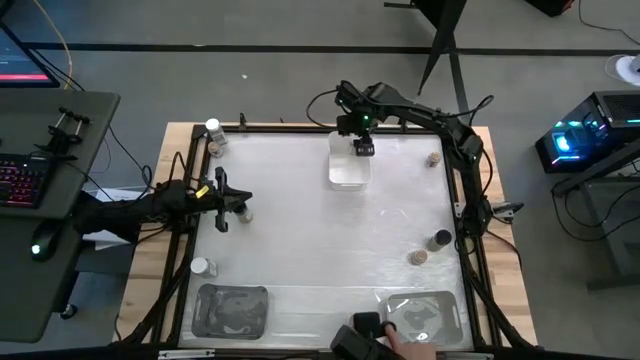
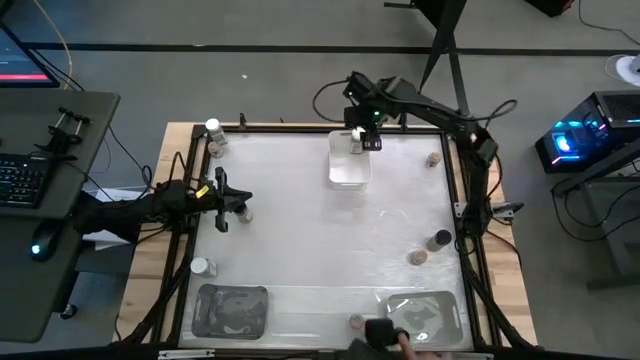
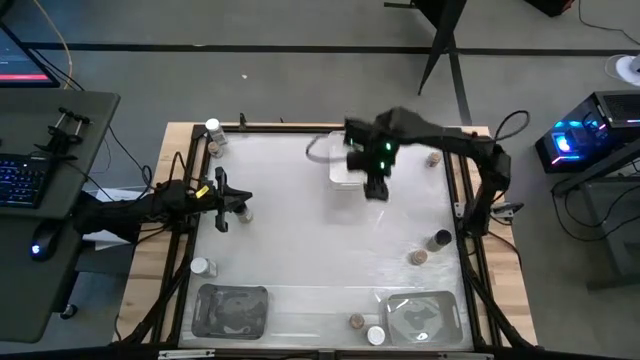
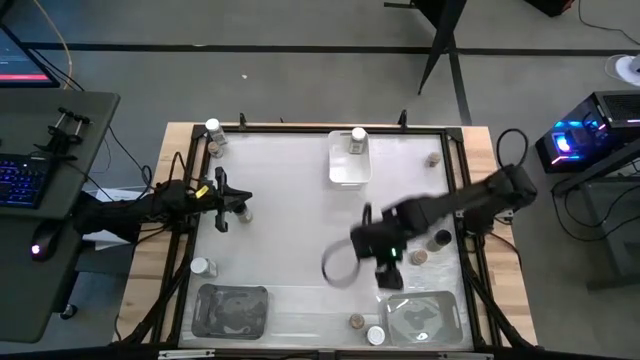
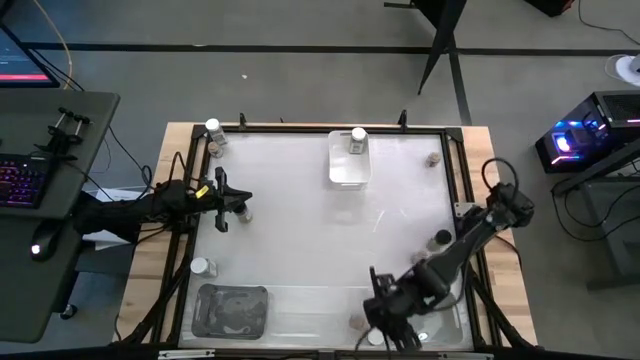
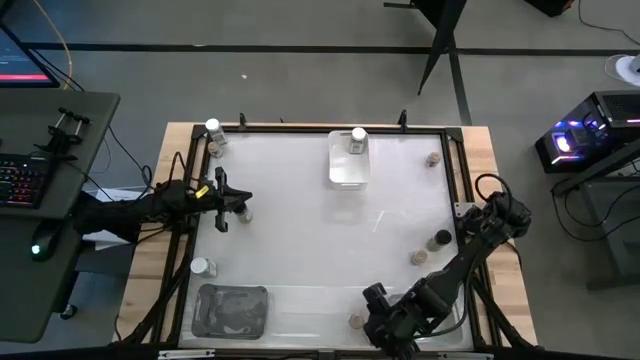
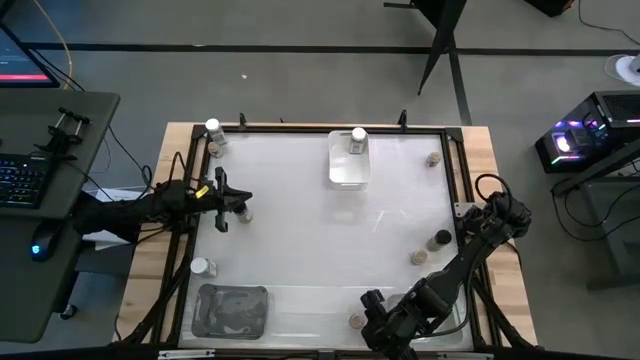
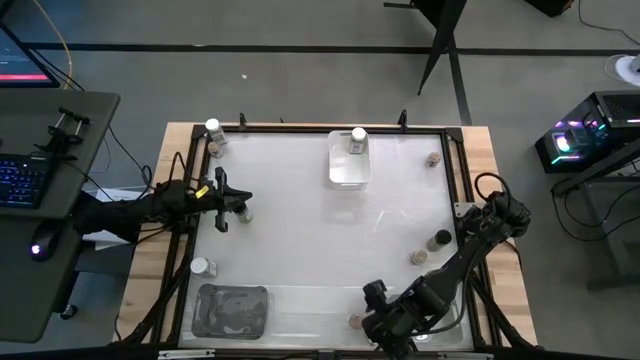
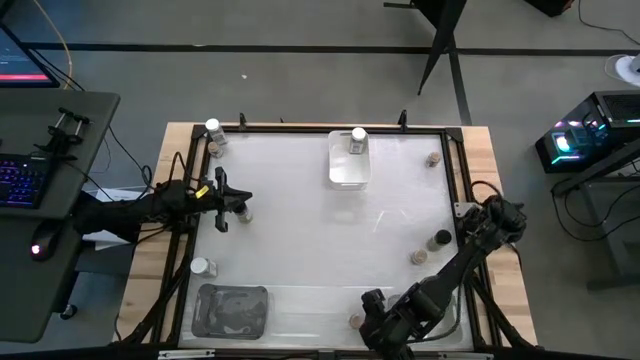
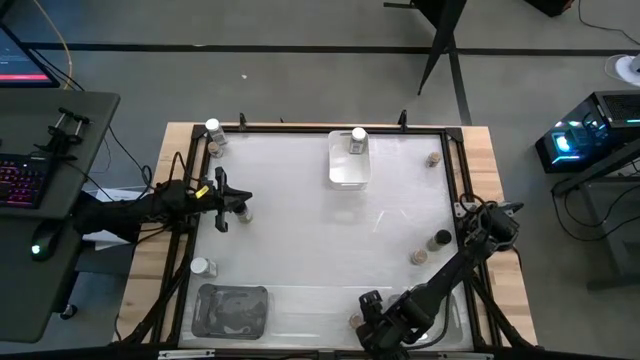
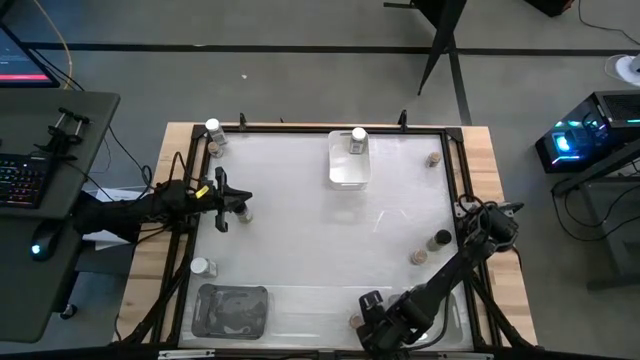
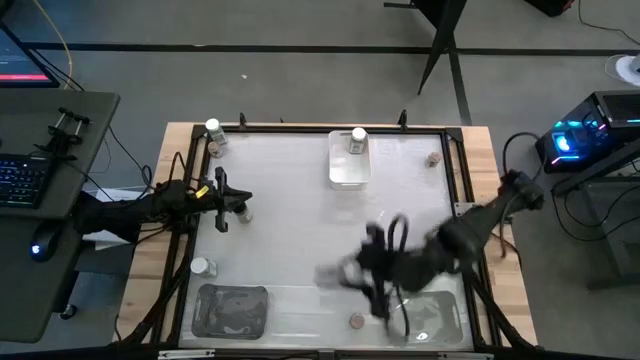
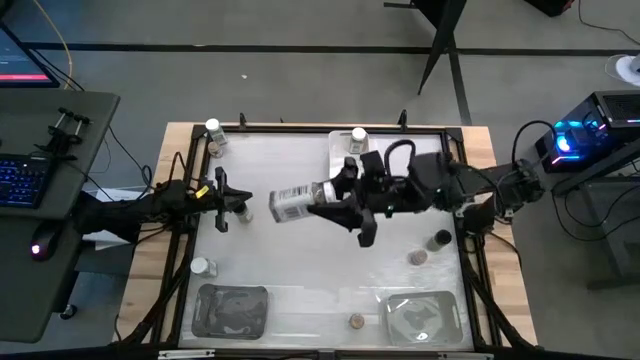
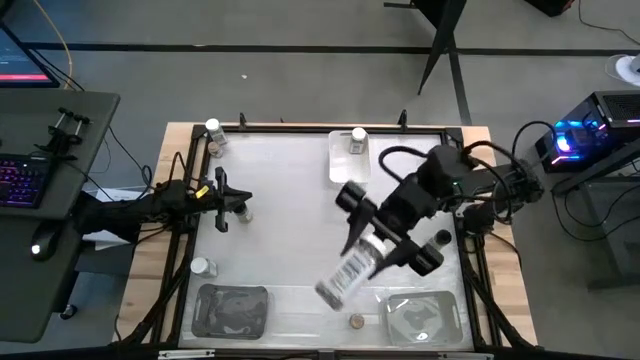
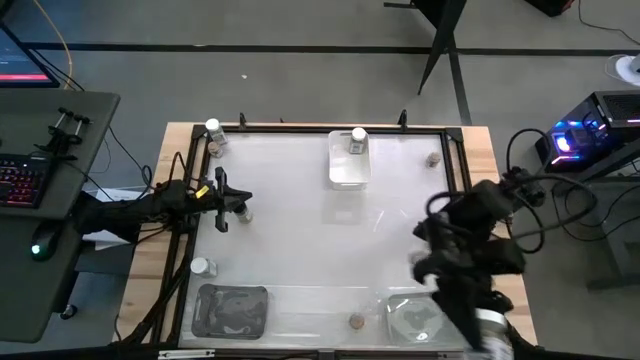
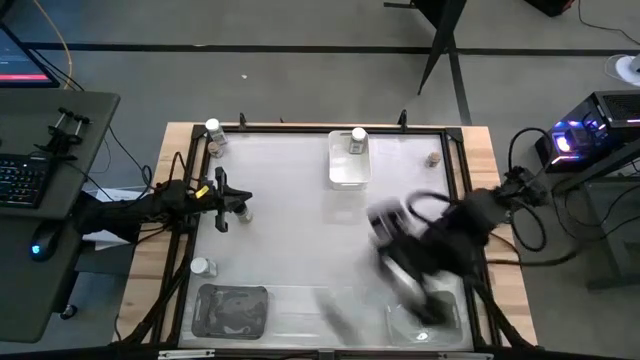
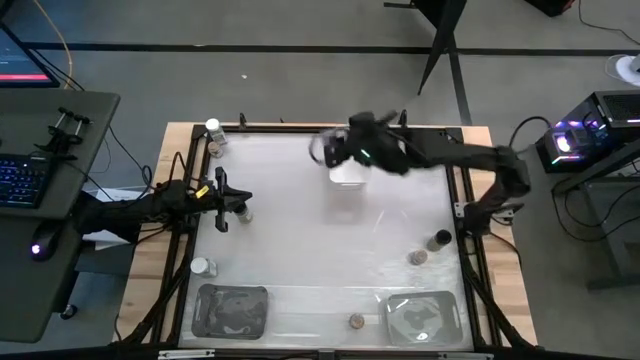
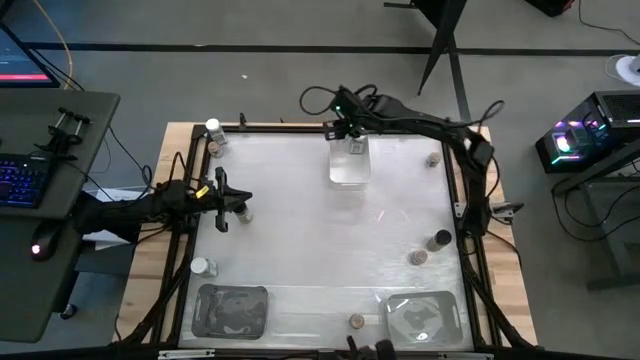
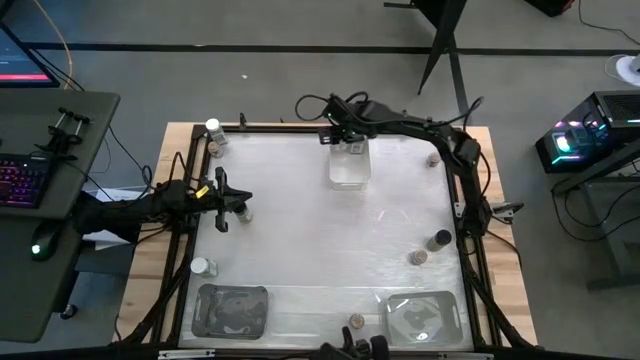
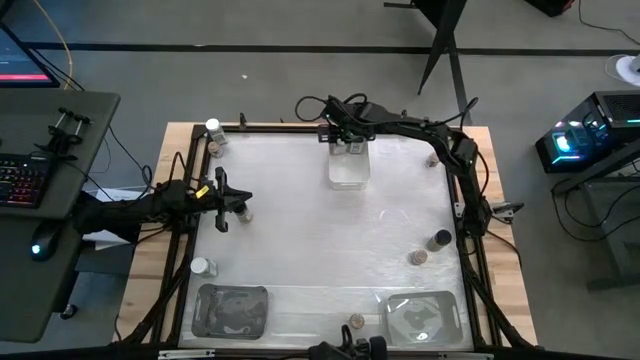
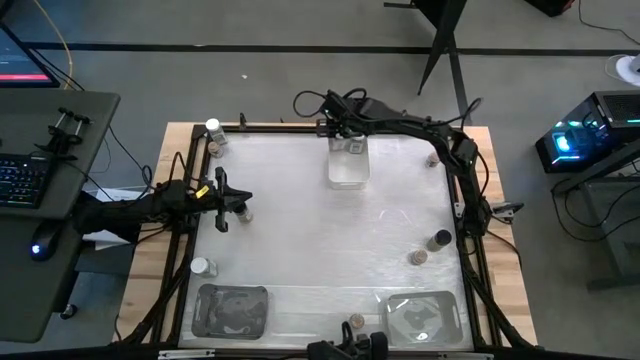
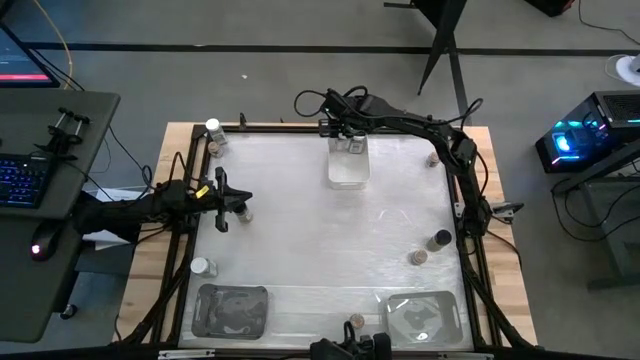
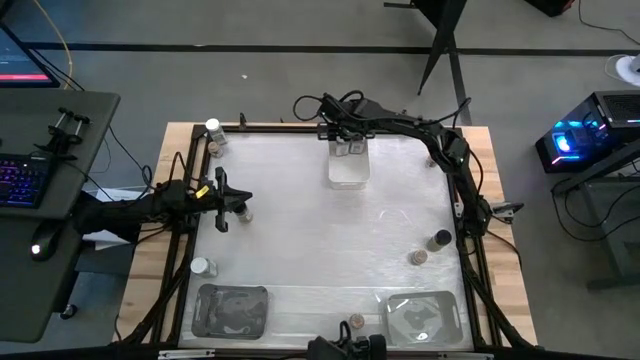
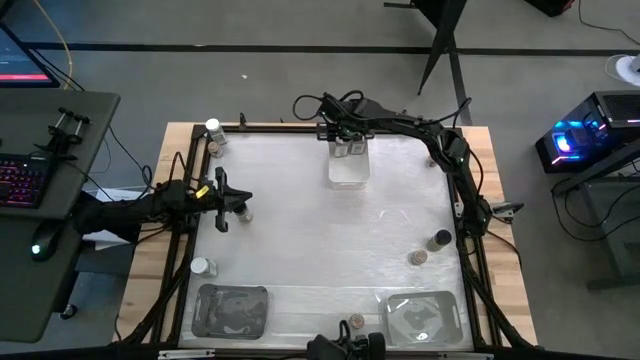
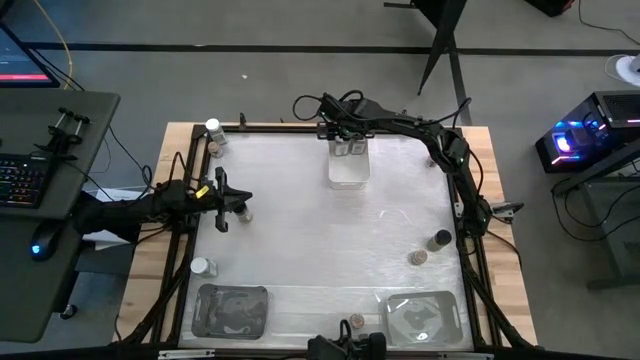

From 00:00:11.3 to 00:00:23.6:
Task: Sort spices by type
Put the bottom right white seasoning bottle into the white bin

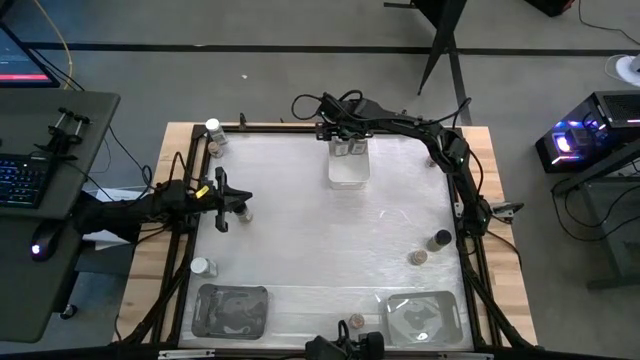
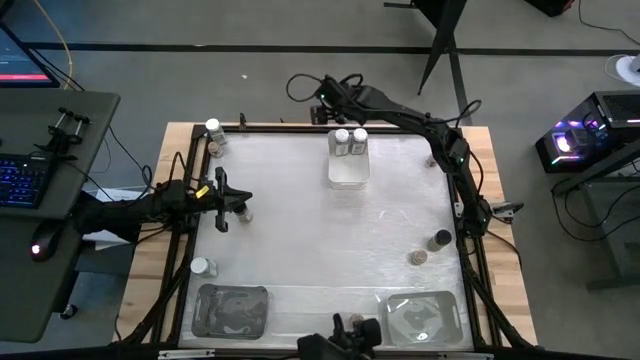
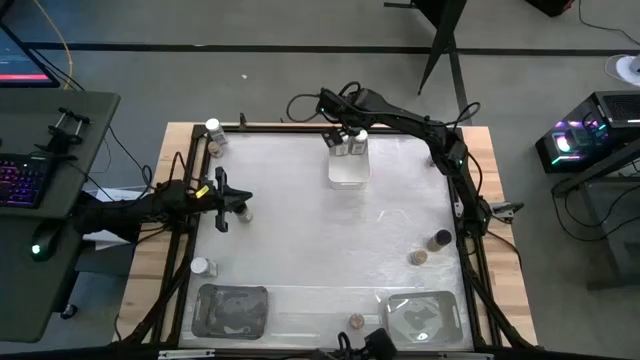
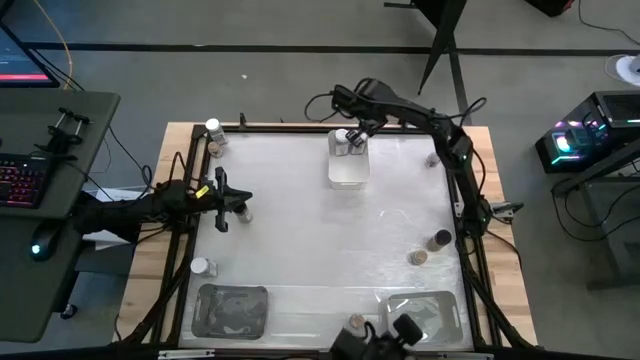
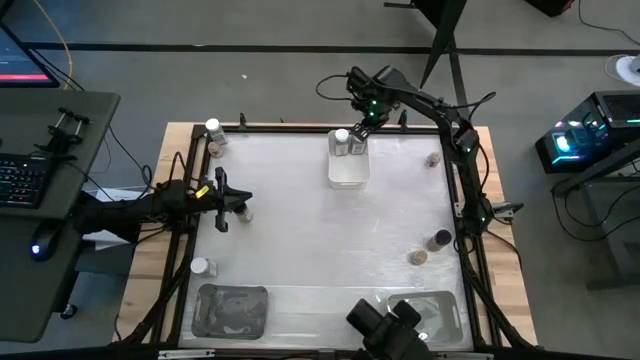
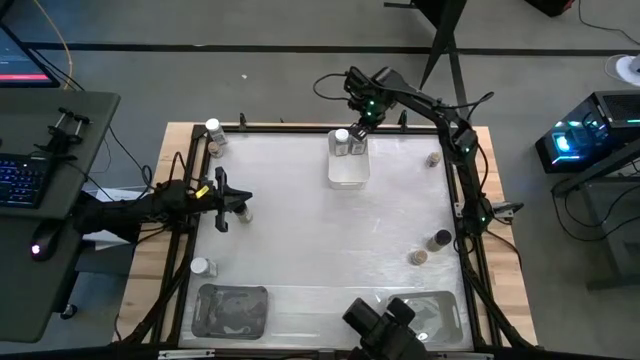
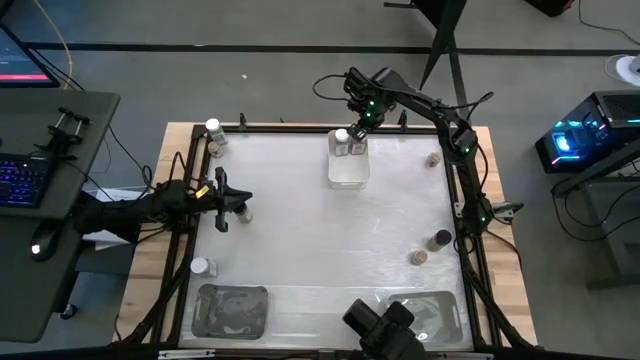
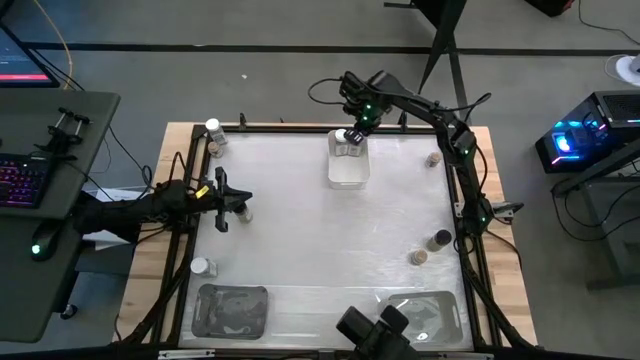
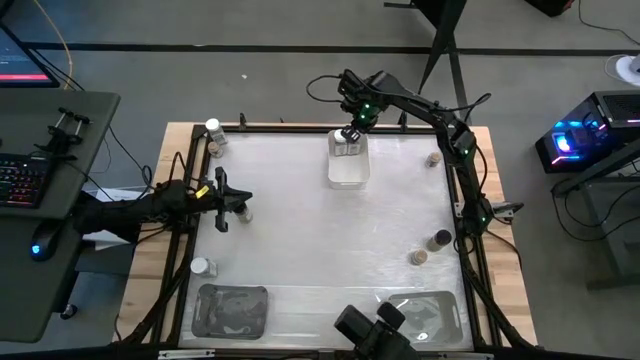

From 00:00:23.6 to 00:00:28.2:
Adjust the right white seasoning bottle in the white bin

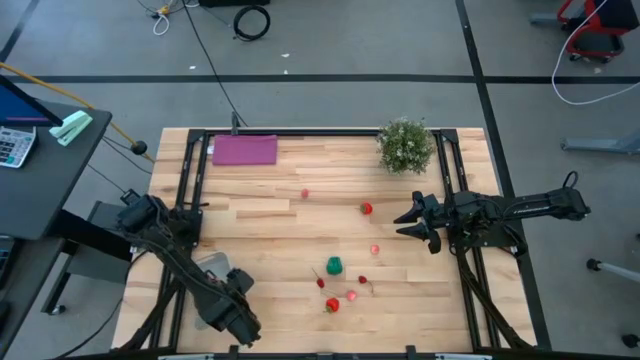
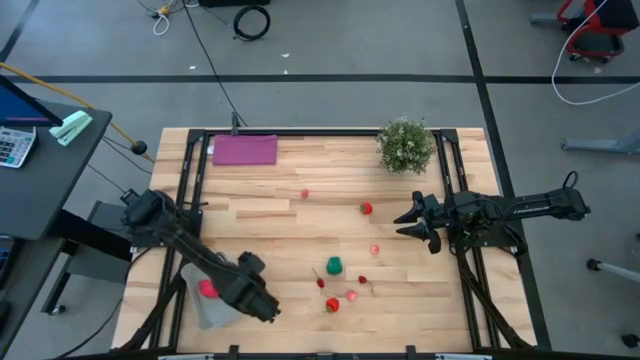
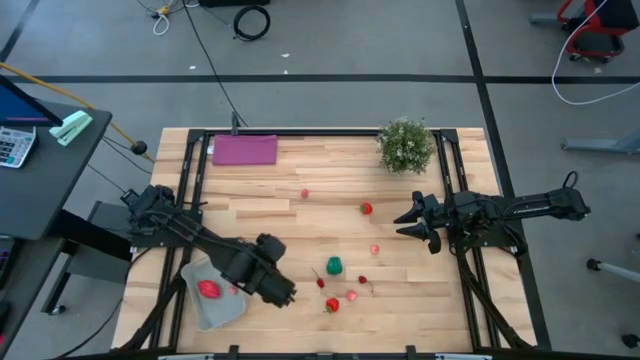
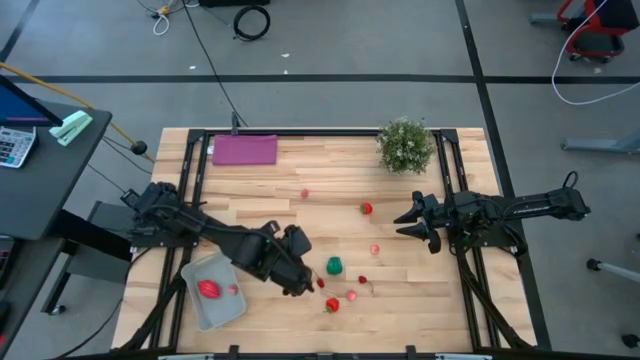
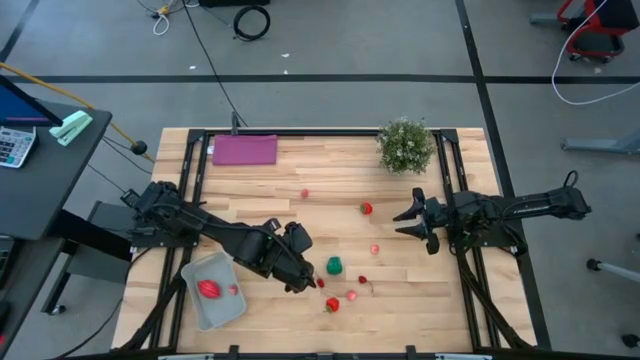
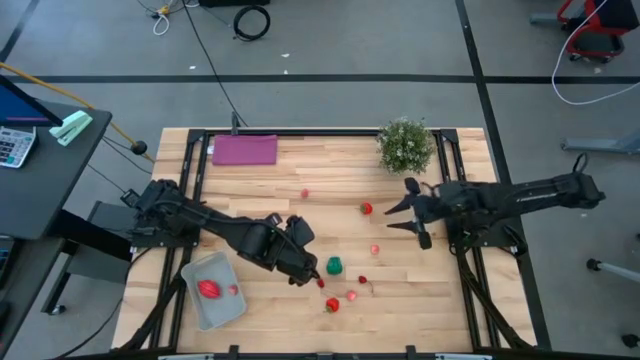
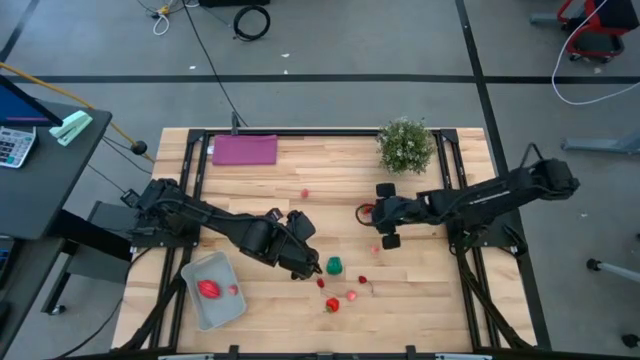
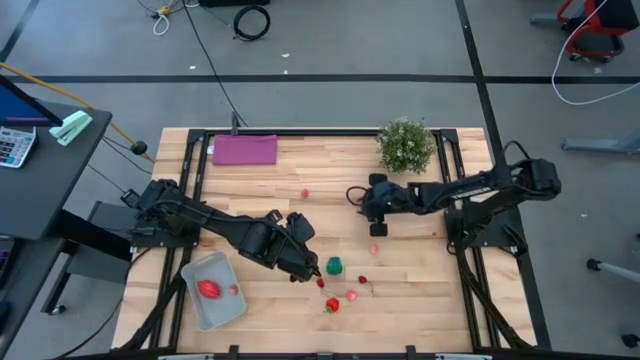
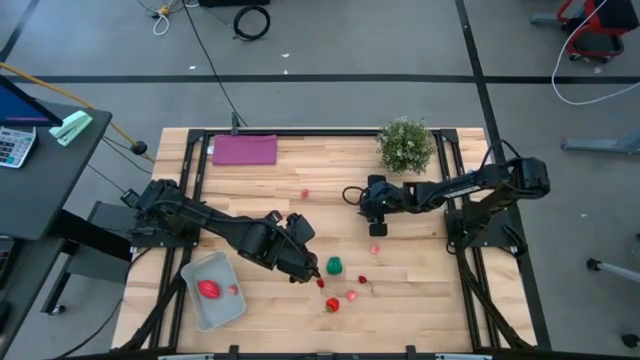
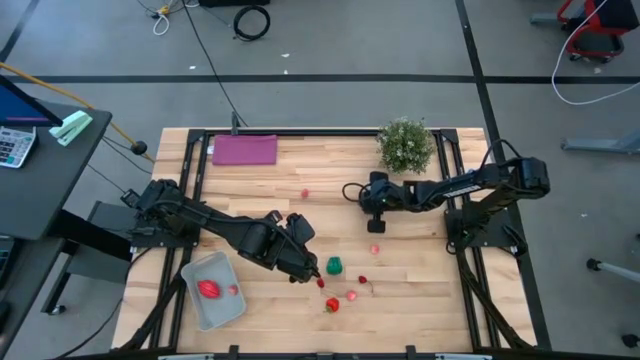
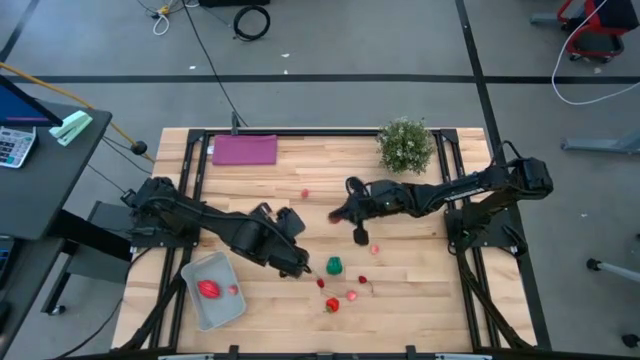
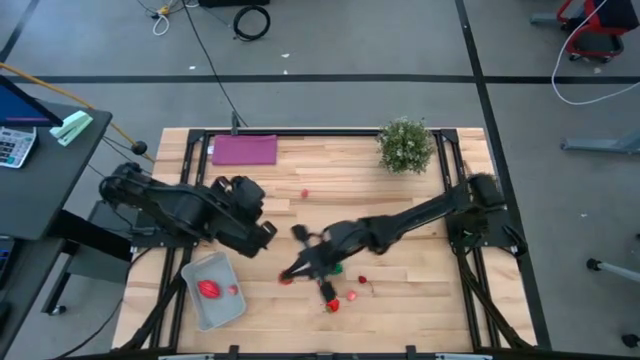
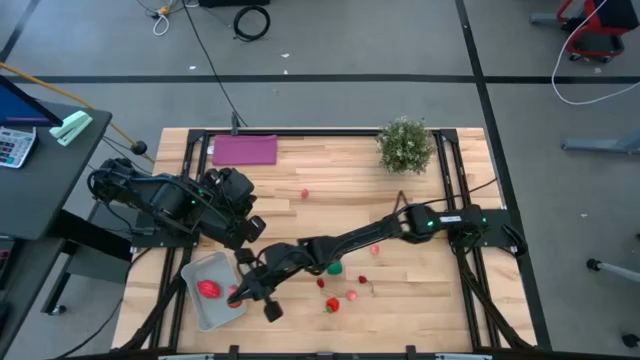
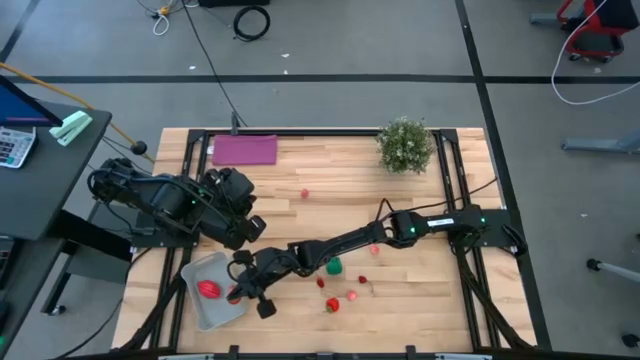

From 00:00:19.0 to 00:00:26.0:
Task: Pick and placing Produce into tupperware
Put the red strawberry into the gray bin
